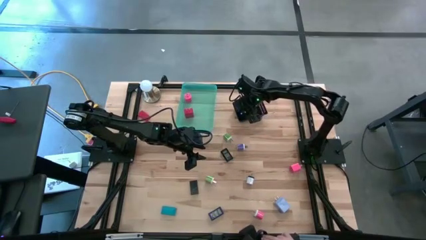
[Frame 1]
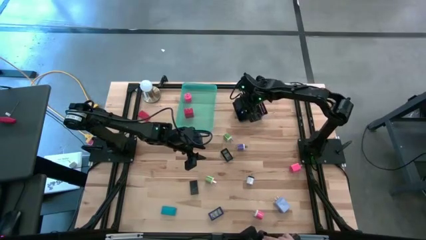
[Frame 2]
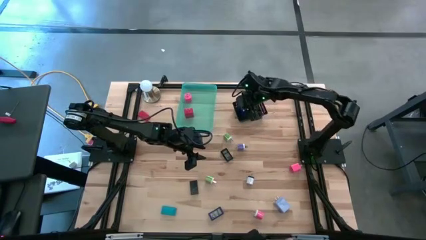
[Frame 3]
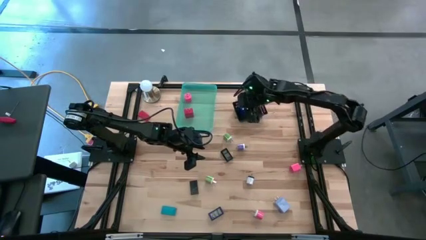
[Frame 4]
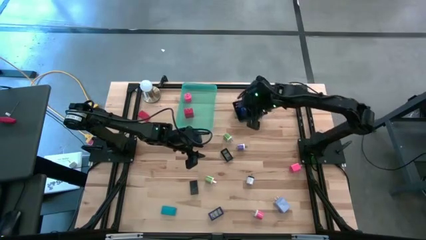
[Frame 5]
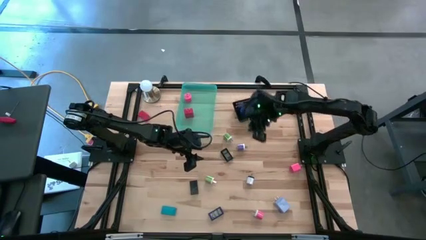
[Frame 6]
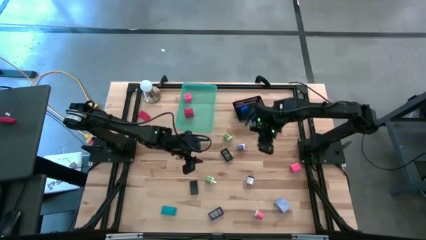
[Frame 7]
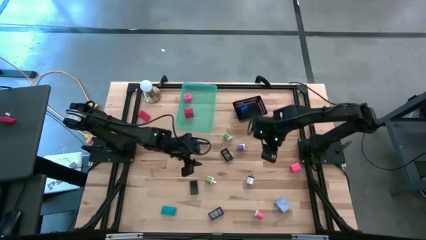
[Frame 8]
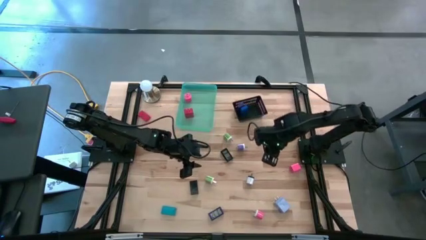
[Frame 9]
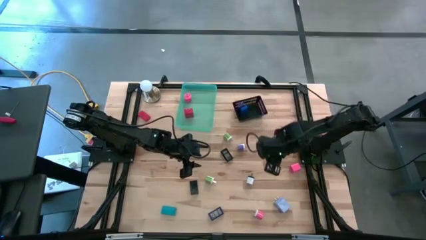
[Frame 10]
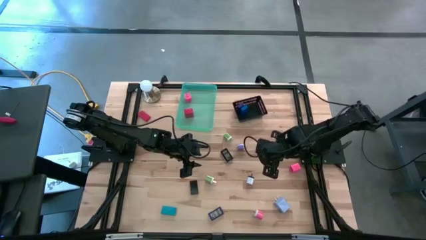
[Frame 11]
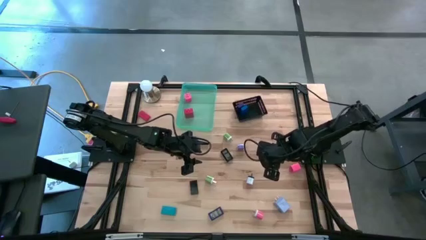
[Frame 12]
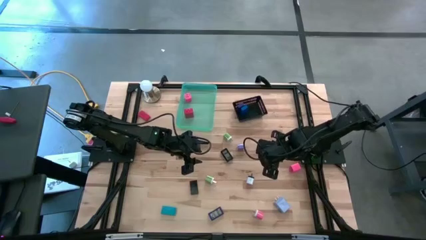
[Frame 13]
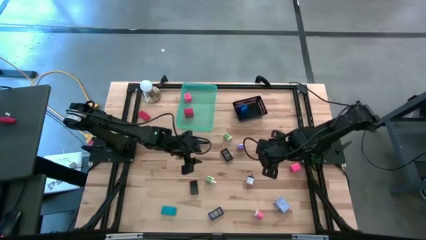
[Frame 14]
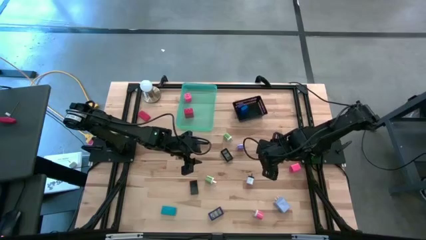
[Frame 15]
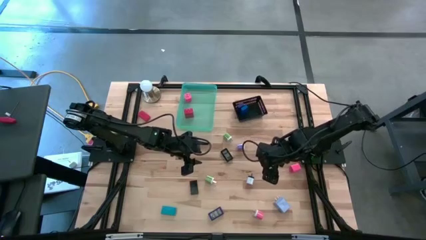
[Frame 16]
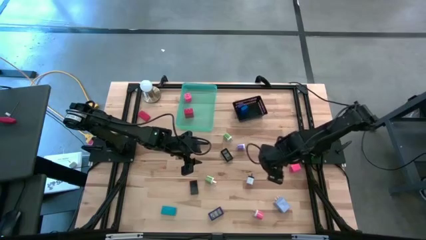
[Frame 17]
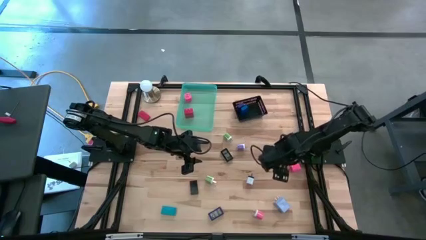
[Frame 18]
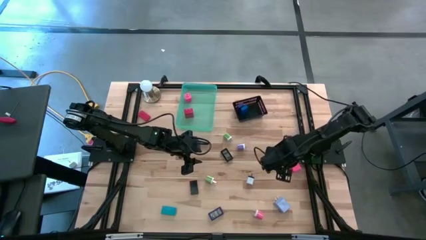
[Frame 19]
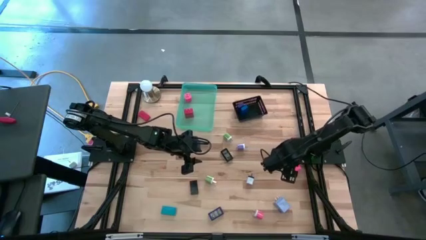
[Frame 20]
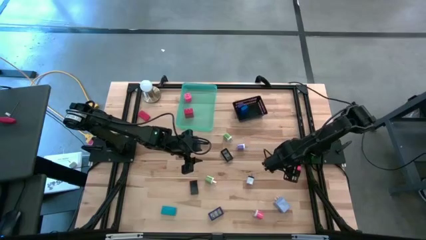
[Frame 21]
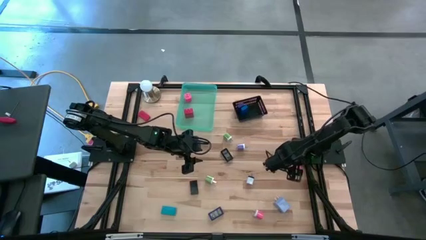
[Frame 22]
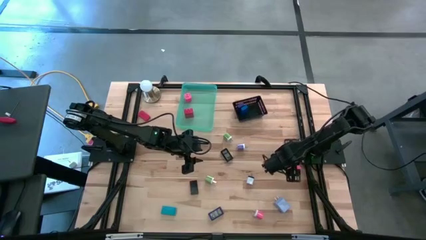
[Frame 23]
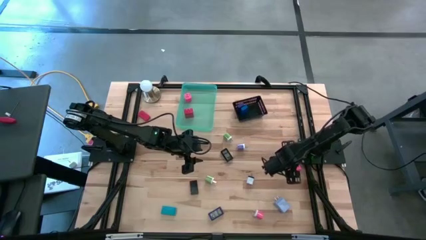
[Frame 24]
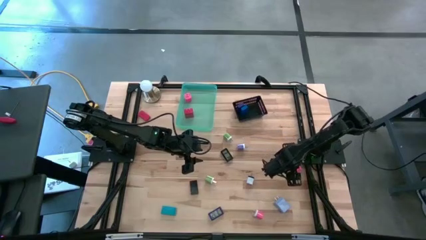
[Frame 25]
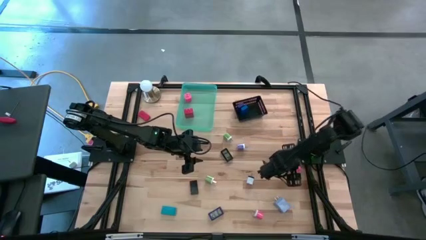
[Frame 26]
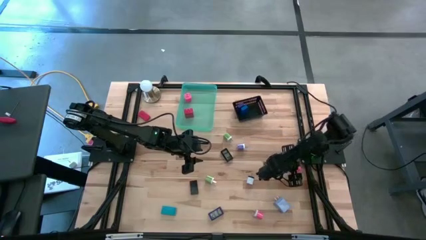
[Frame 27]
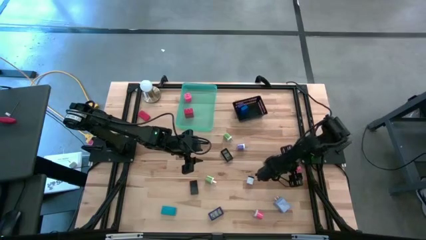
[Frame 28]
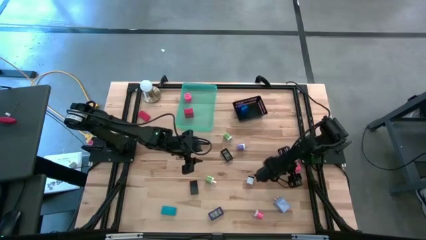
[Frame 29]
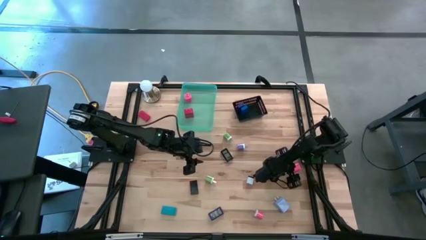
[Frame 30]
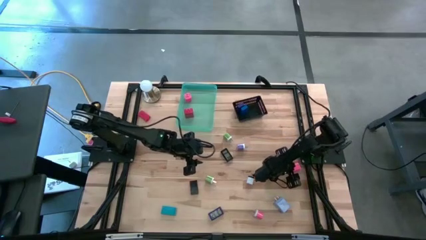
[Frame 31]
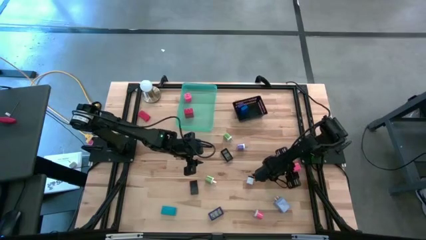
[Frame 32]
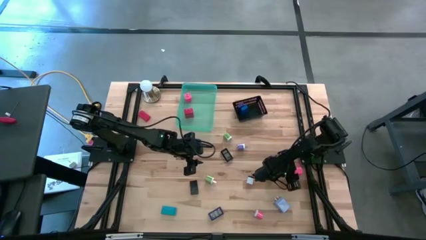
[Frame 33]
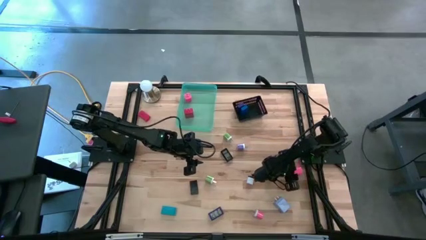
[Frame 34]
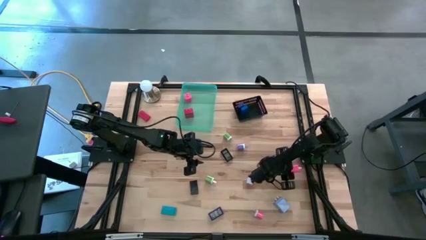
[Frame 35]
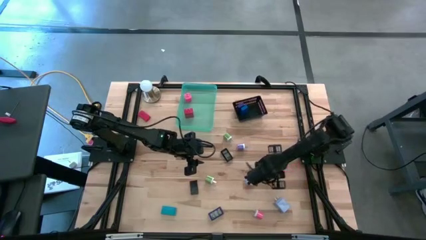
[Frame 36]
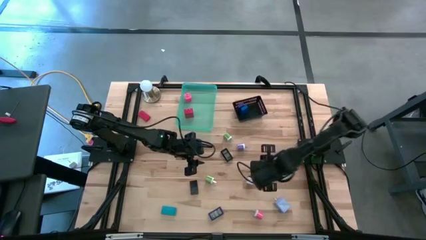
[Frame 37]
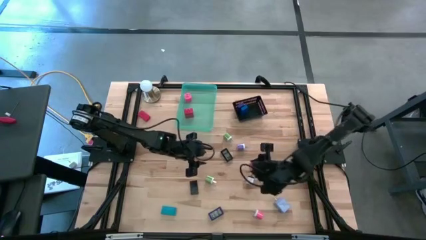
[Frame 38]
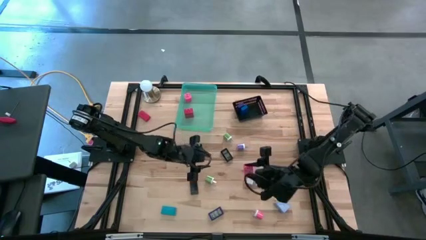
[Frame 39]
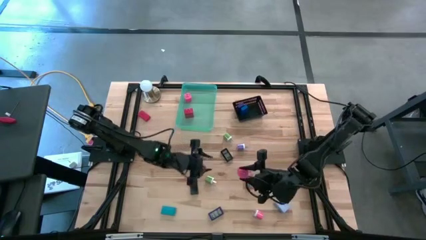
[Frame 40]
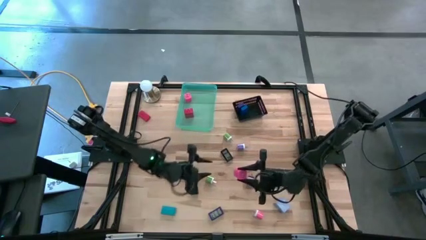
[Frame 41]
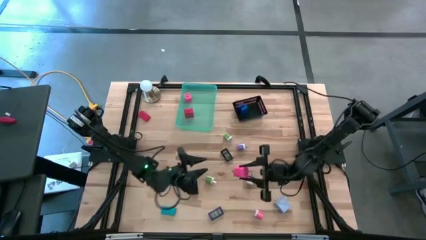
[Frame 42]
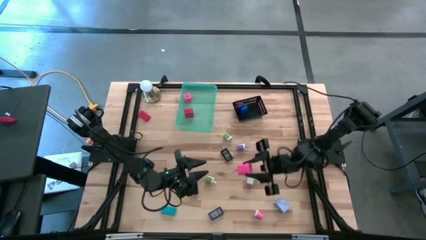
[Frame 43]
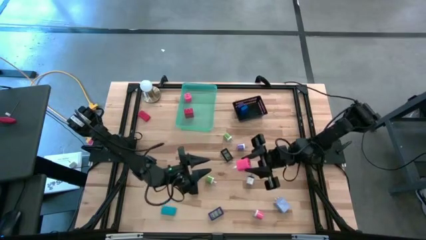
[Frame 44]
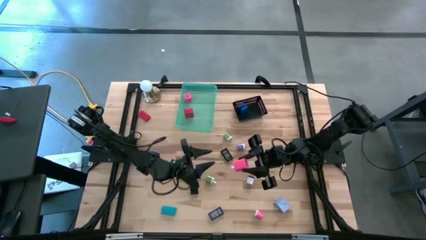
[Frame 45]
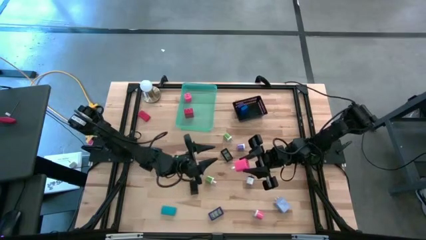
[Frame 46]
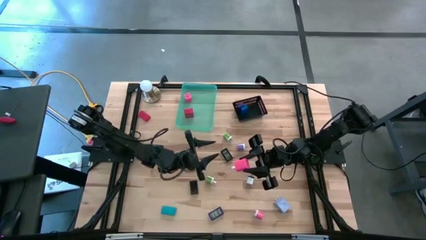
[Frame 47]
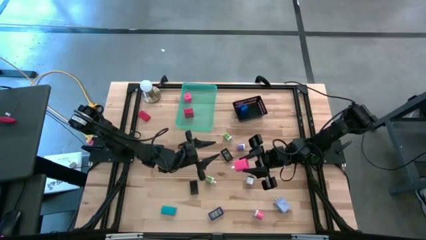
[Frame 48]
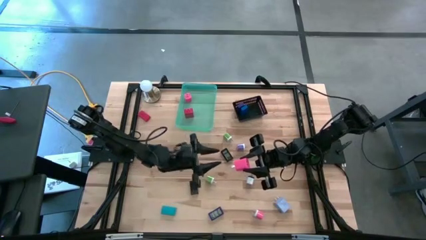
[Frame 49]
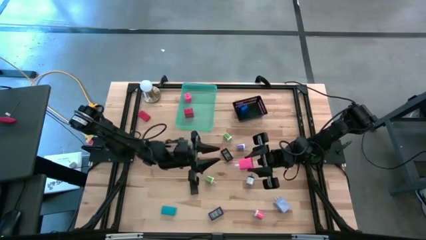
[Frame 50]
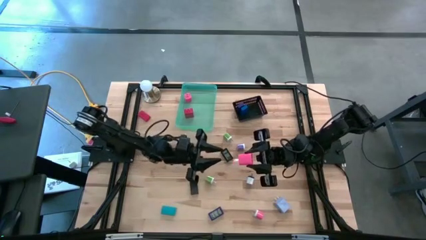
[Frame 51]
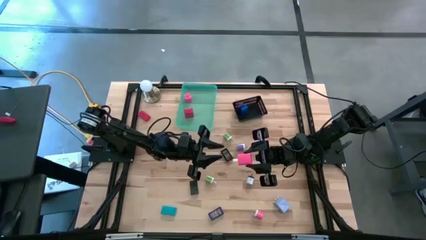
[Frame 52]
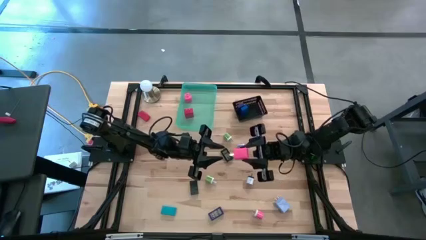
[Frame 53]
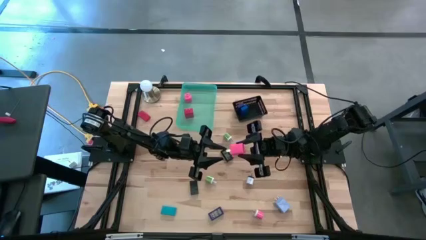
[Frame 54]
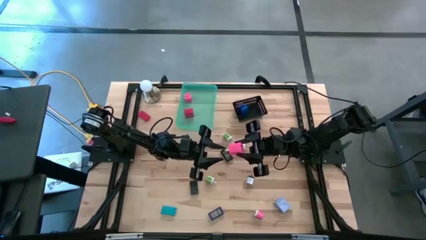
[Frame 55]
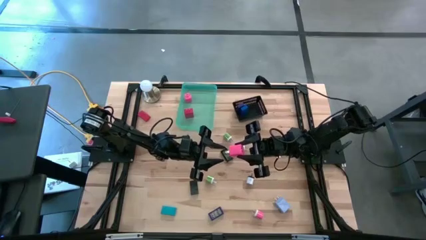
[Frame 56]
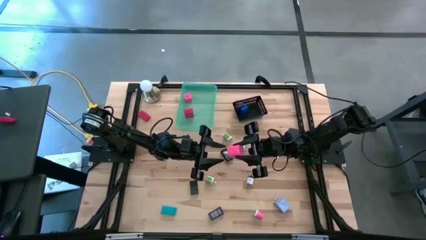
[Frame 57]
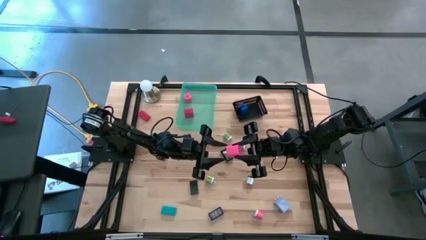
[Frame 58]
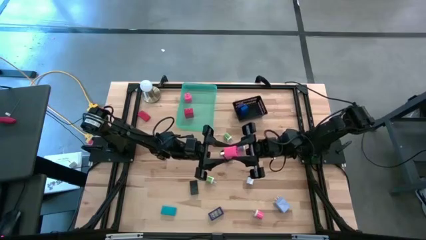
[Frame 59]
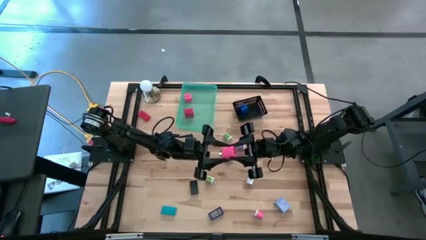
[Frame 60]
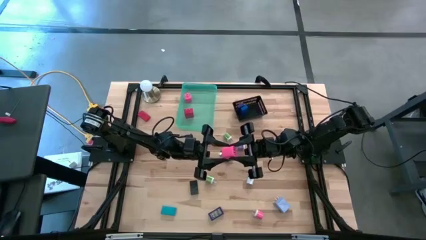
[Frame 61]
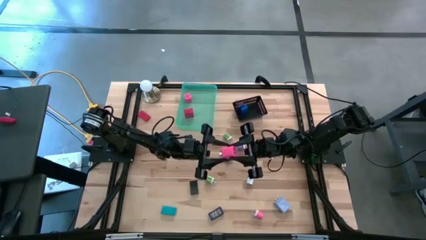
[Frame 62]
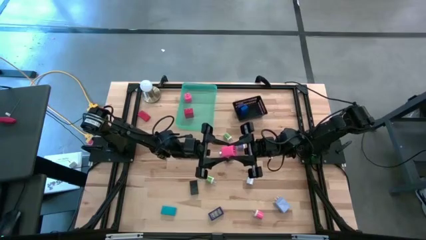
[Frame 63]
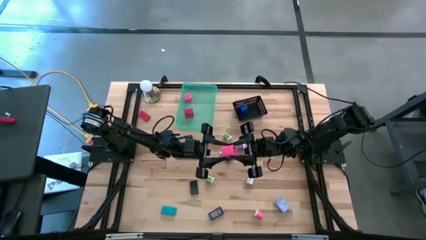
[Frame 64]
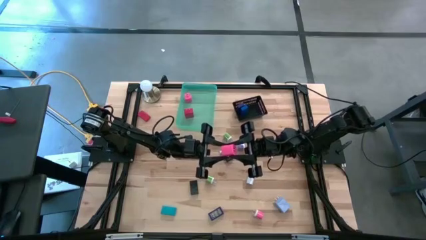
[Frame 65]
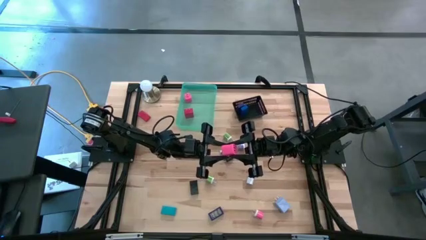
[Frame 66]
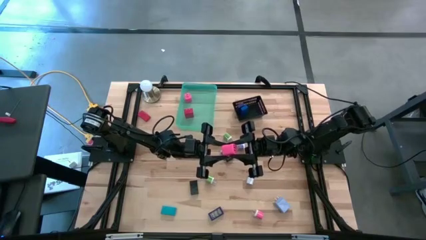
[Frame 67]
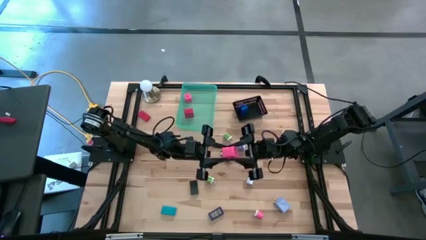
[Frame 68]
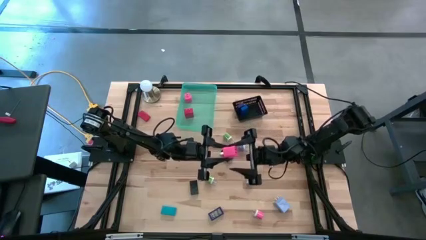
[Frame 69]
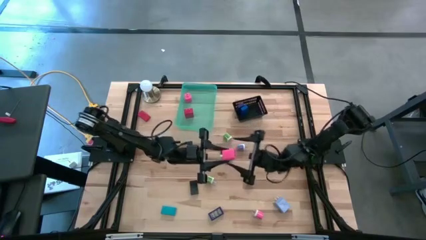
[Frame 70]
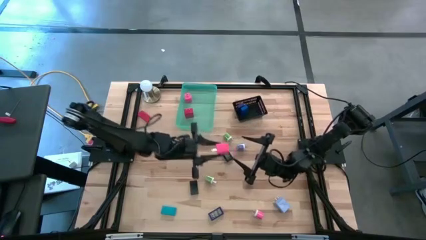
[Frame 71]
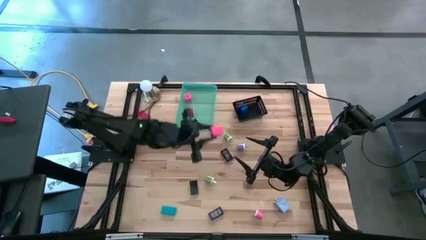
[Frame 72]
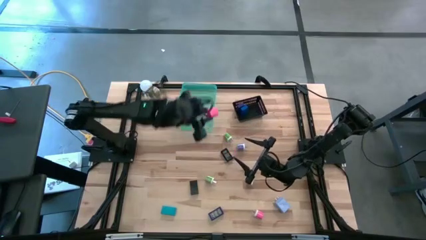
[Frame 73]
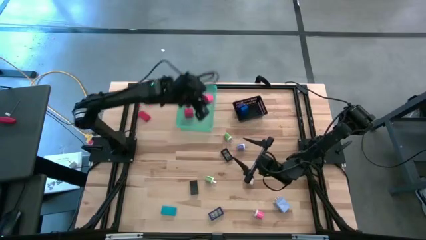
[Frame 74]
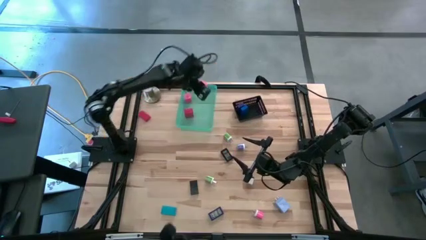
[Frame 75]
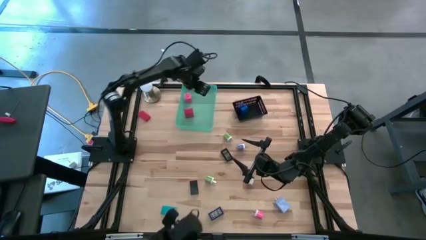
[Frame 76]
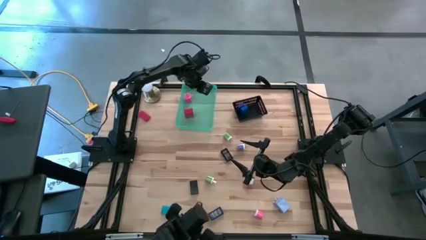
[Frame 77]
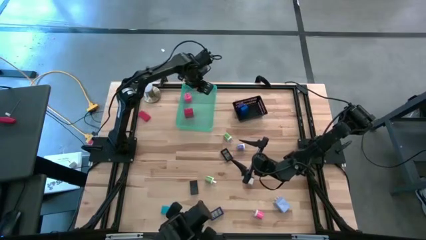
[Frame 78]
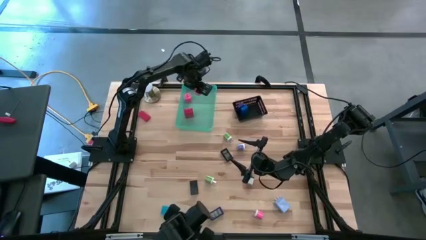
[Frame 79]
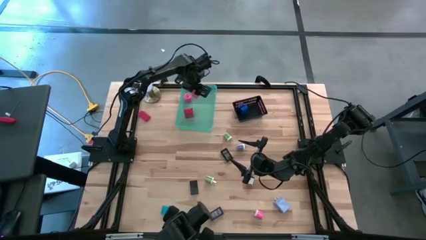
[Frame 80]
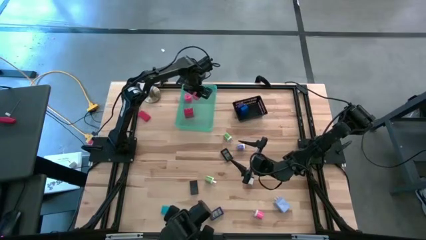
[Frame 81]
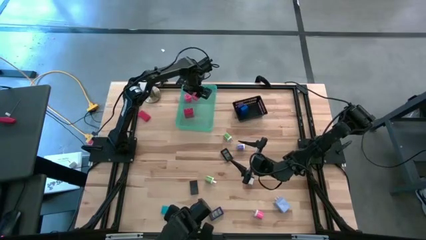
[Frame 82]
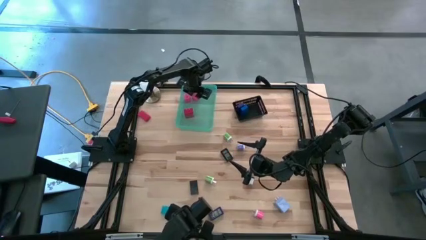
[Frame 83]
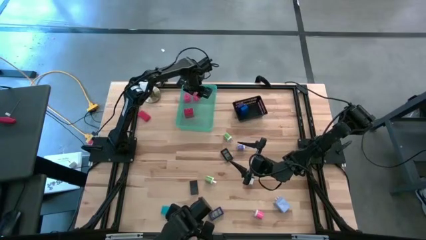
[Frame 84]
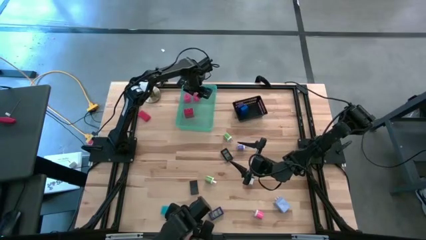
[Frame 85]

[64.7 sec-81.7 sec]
Task: Pick & Place Office items
Put the pink charger adapter into the green bin
